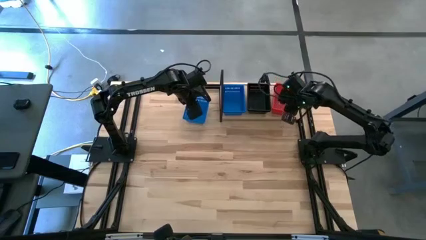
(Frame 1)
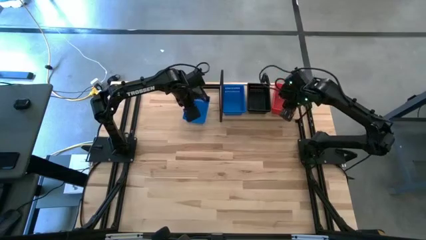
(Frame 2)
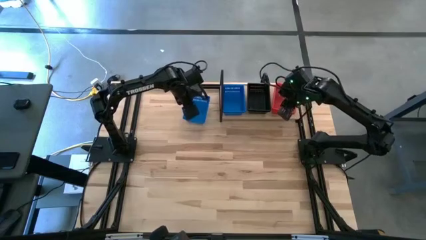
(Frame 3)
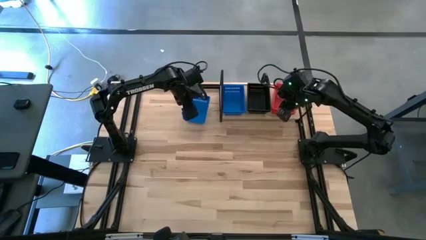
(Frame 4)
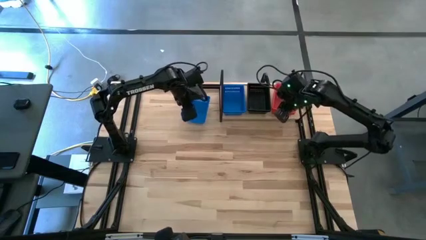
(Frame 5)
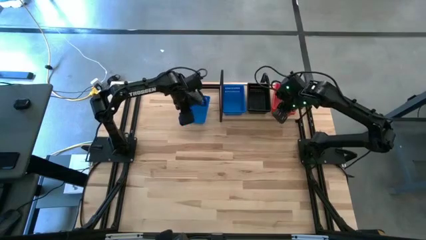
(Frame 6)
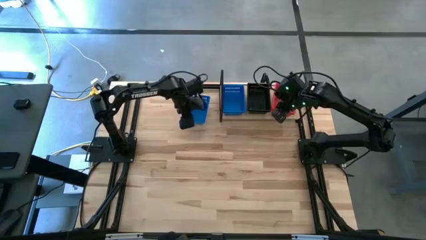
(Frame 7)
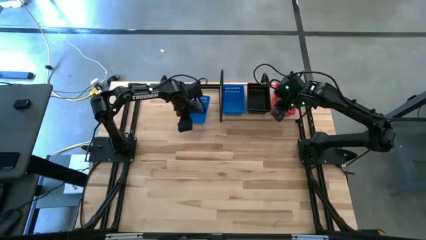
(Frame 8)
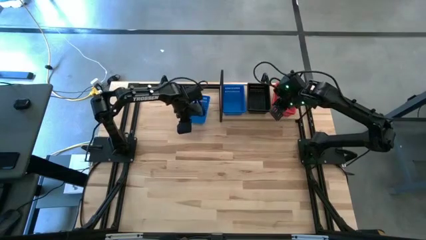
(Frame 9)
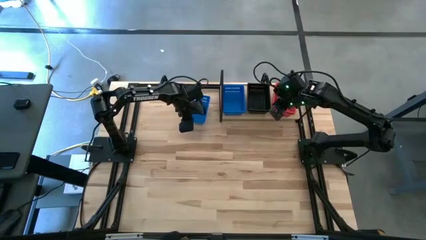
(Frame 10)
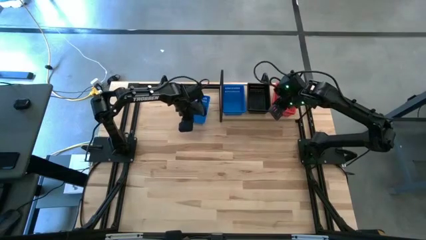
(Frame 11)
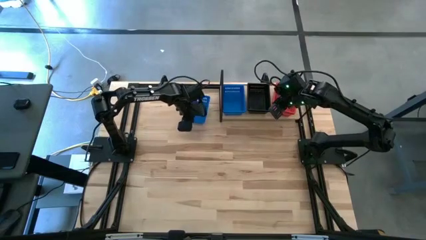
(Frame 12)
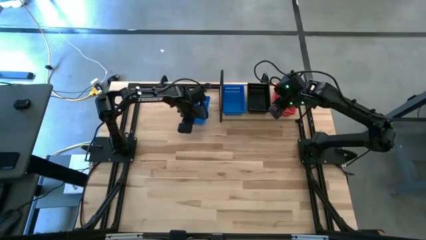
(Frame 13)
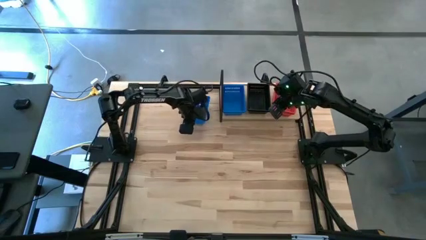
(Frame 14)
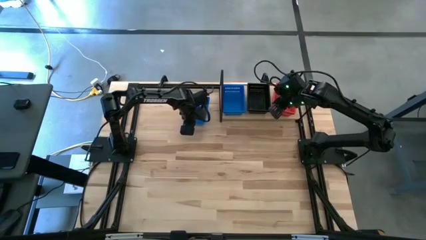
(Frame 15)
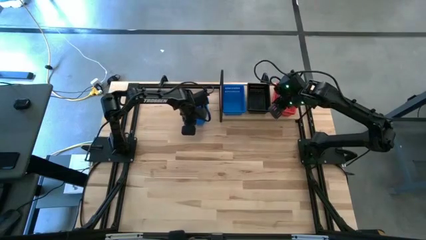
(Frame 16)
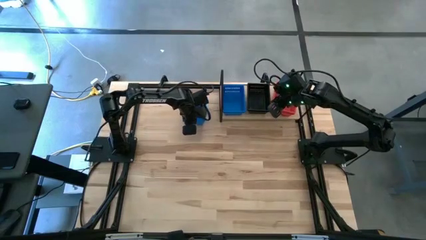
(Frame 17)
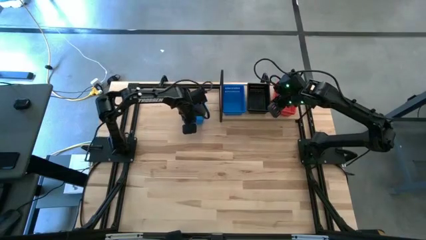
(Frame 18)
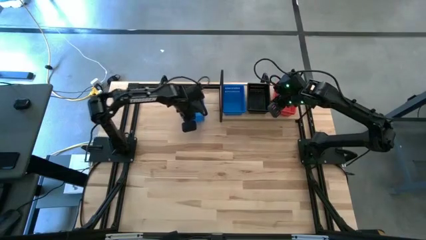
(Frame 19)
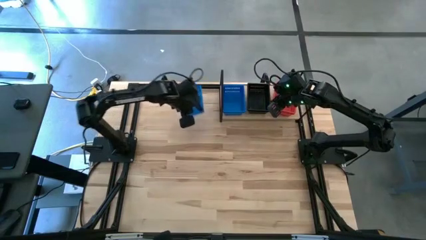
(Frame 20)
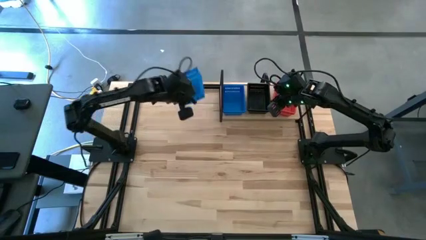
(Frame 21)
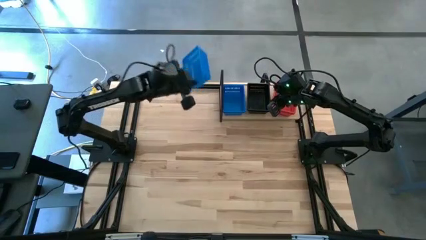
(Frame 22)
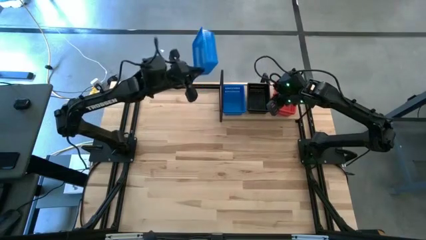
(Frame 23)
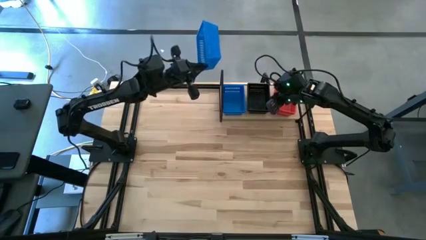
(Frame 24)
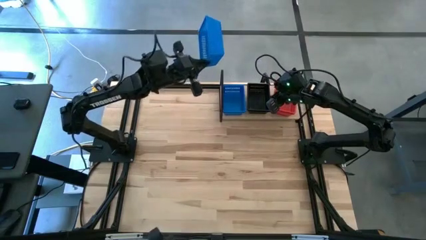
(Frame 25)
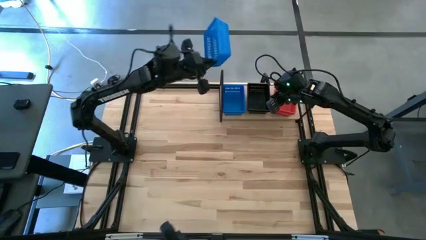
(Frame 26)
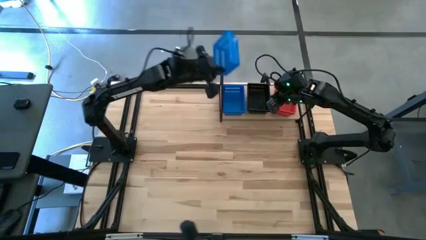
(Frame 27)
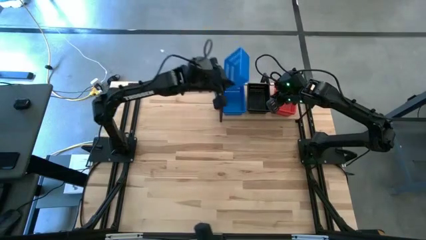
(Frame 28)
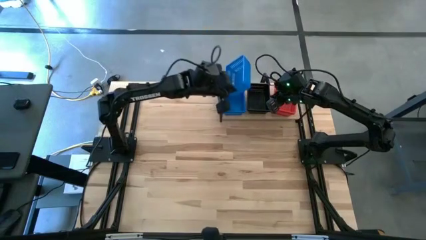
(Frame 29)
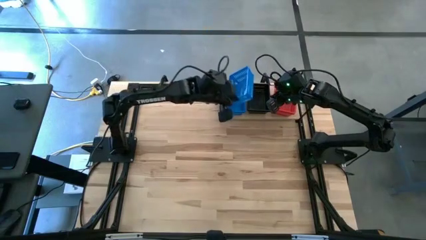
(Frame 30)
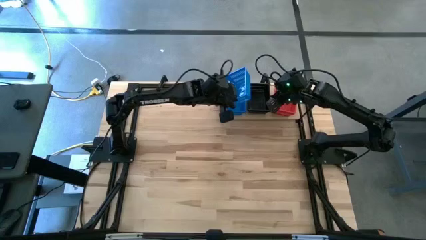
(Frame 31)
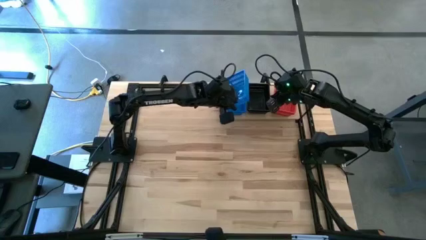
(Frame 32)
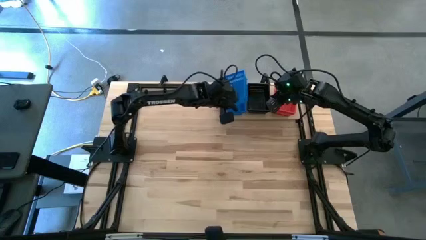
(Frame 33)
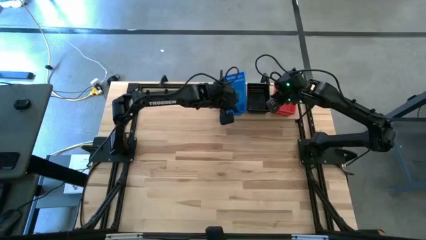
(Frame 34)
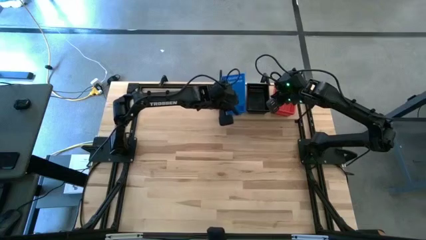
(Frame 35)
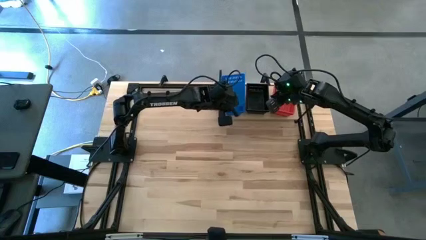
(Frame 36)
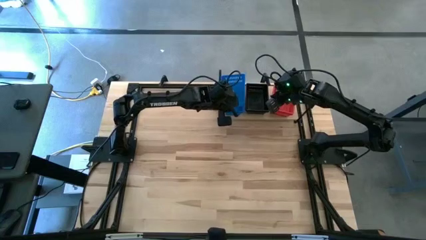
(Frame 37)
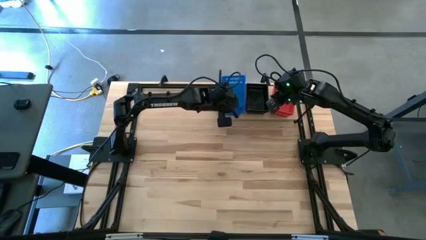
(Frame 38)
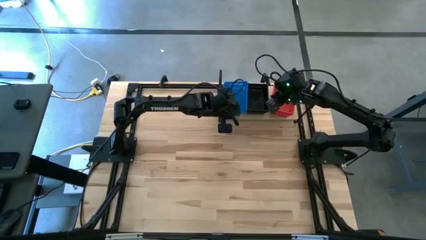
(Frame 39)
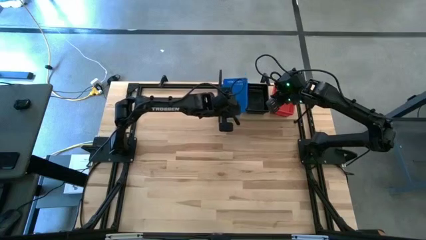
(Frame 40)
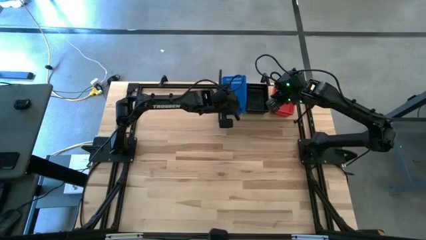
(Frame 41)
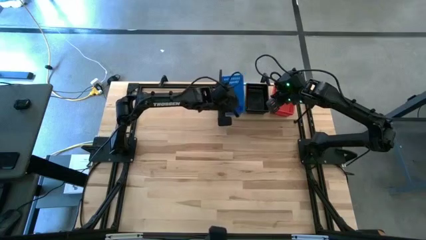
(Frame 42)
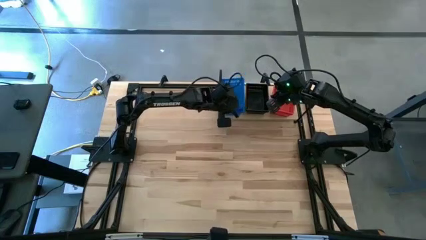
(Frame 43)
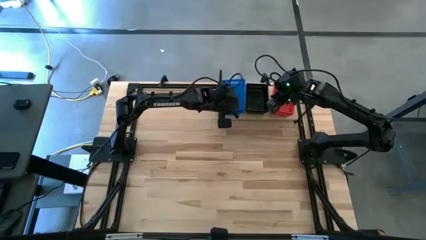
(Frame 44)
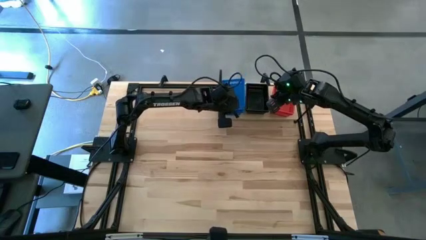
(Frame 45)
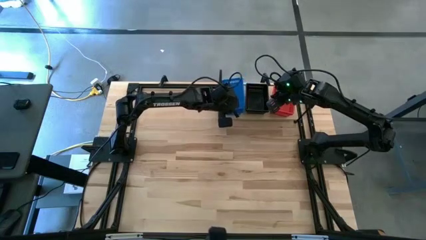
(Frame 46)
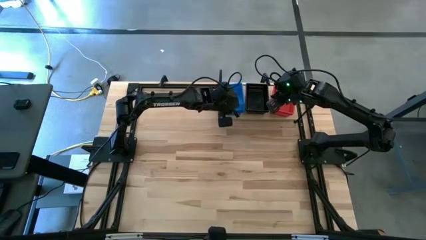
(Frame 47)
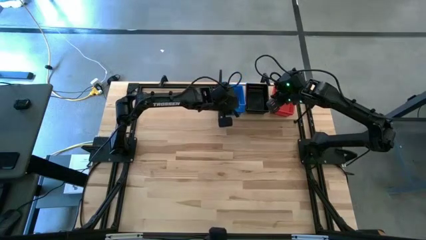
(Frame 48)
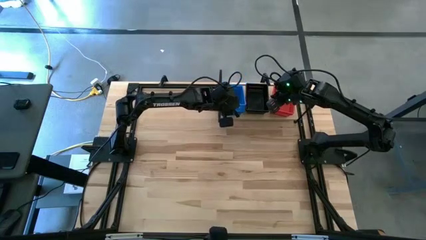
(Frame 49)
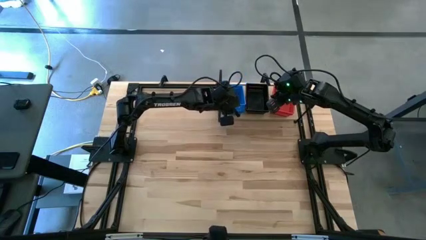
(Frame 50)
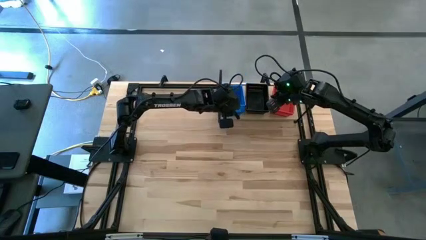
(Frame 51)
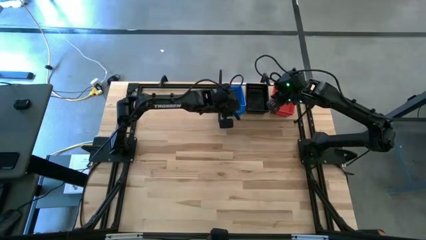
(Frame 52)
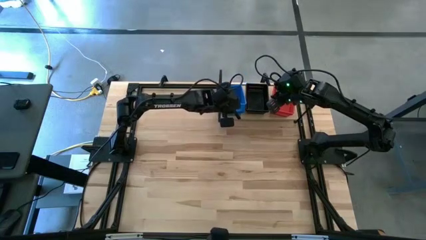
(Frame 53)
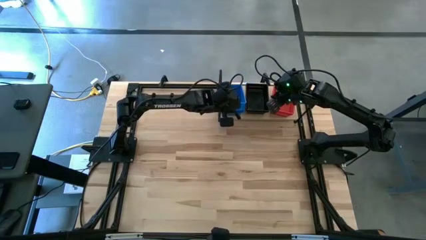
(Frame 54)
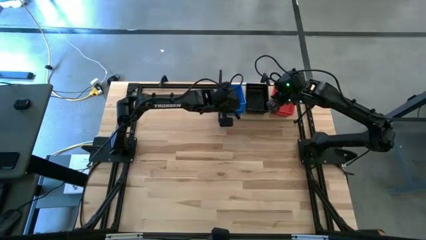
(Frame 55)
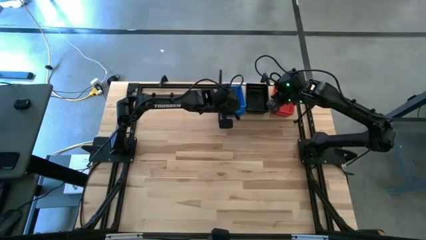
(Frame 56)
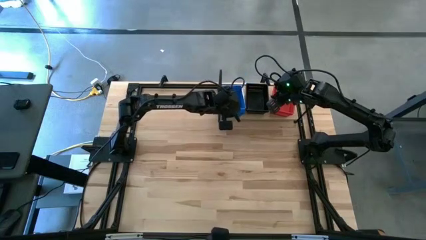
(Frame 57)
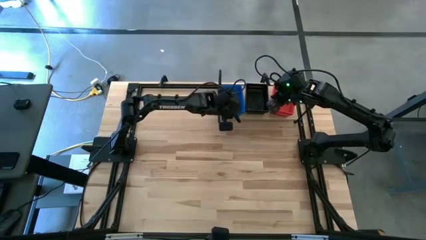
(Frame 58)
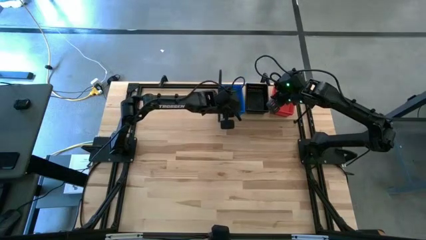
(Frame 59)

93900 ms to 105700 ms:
Task: Stack baskets on shelf by color
Stack the blue bin on top of the other blue bin on the shelf

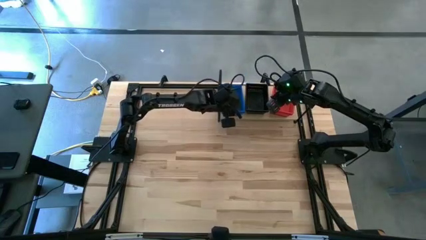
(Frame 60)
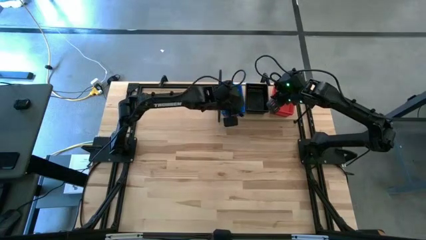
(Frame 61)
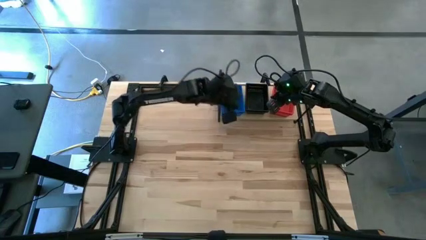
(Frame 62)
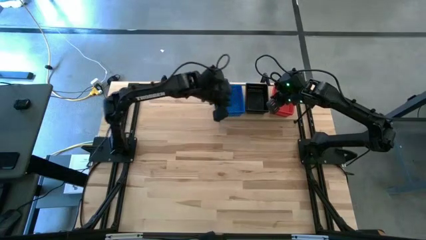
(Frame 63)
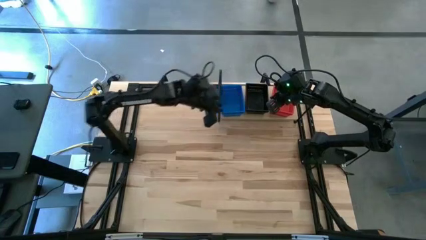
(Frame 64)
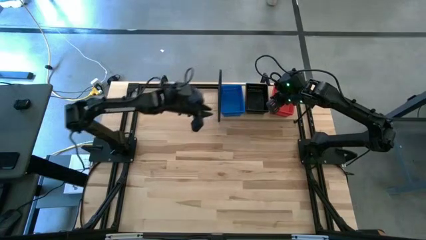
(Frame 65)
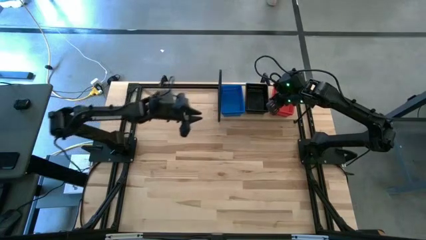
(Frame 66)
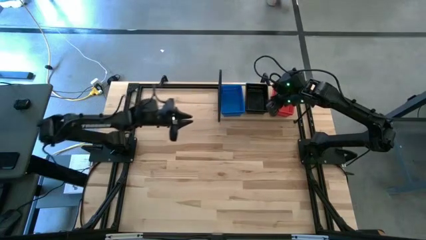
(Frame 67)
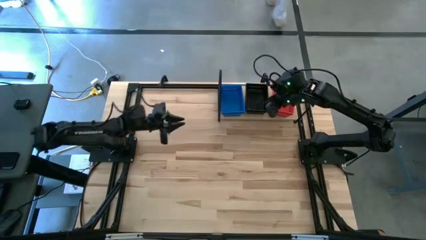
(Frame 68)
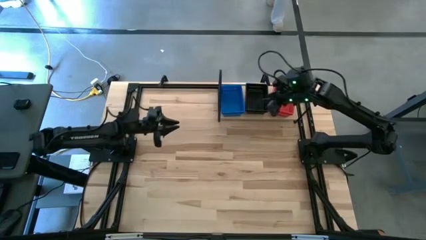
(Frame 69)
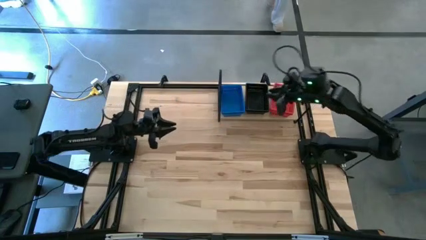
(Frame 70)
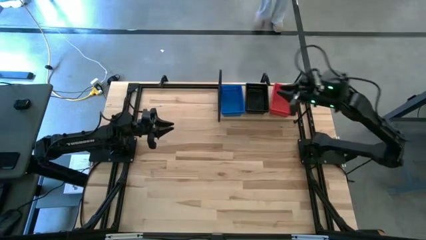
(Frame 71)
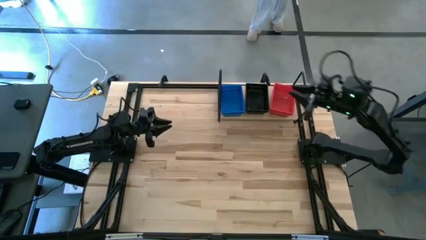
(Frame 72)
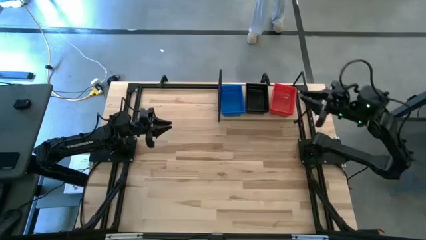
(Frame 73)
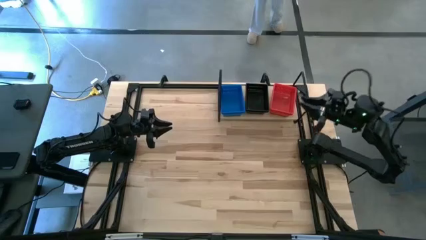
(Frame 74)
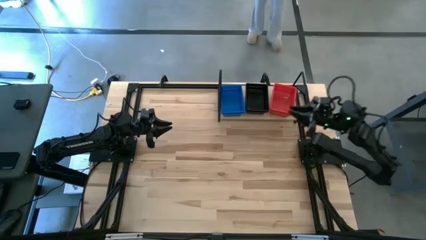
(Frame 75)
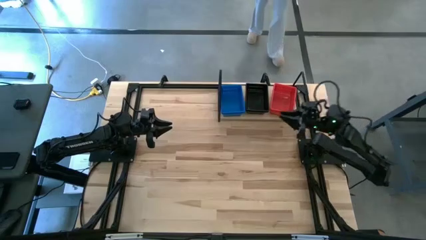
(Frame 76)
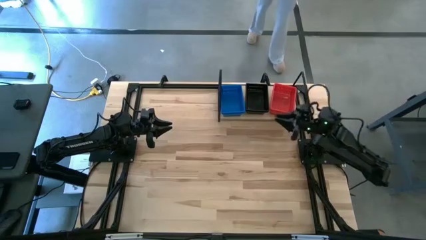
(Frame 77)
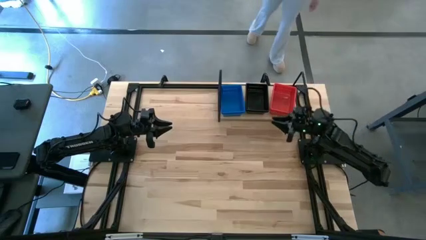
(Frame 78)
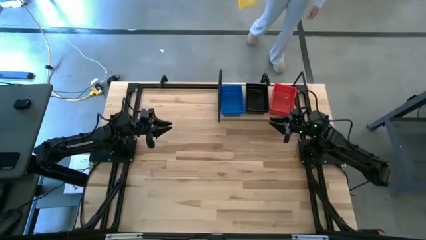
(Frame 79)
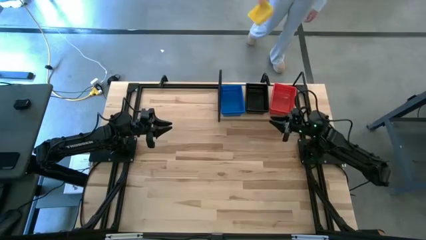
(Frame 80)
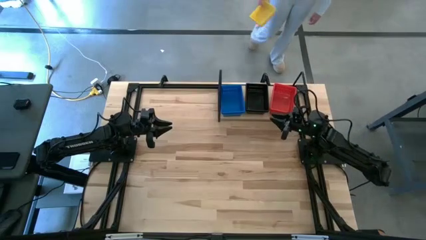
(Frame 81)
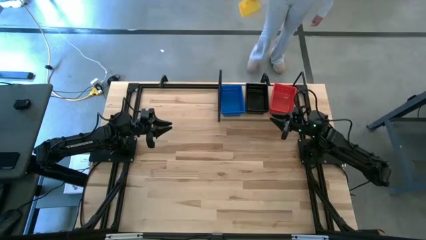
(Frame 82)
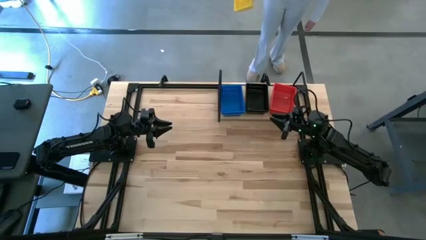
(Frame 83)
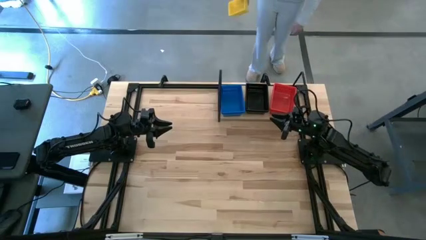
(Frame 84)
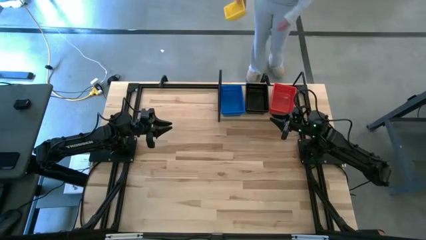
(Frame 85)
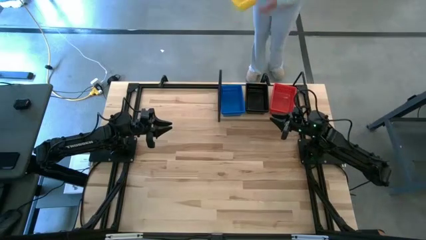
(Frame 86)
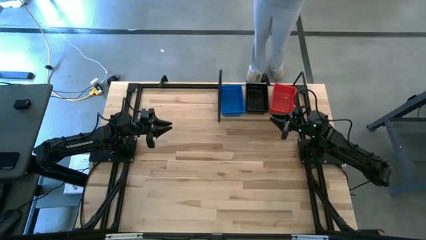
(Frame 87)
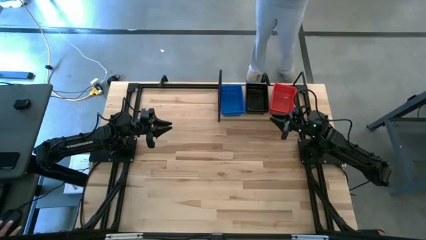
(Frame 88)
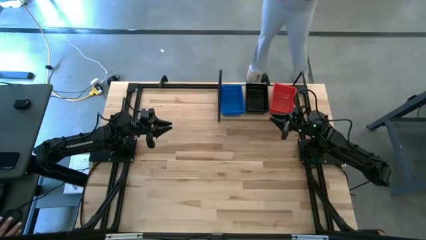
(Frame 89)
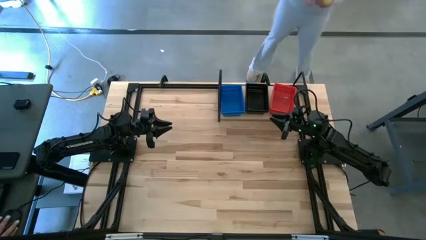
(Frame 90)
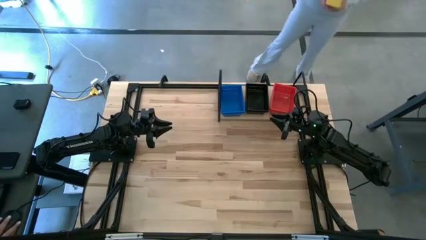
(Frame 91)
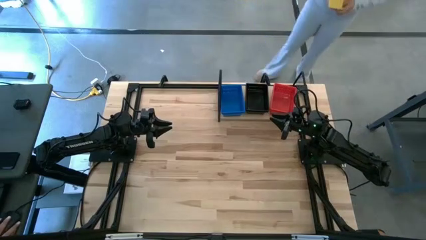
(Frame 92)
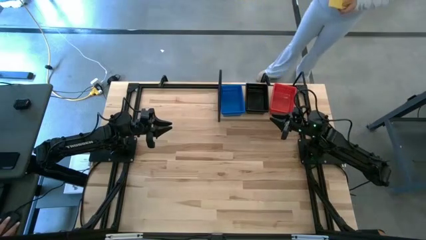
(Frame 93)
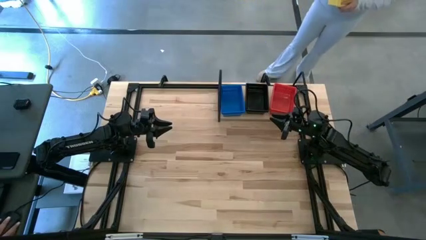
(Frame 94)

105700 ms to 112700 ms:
Return to Home Position
